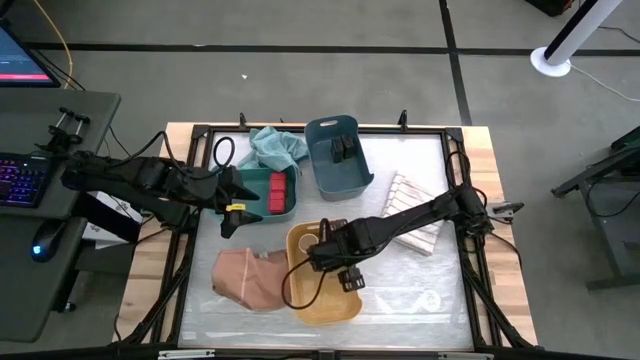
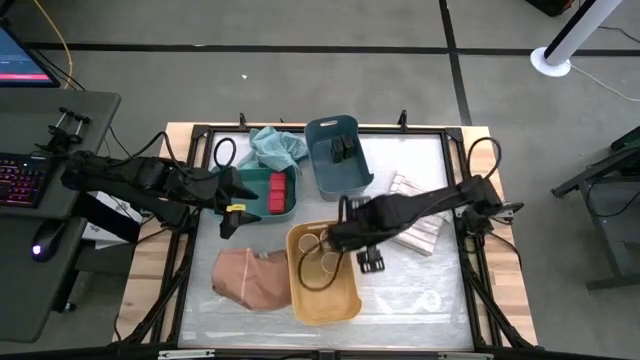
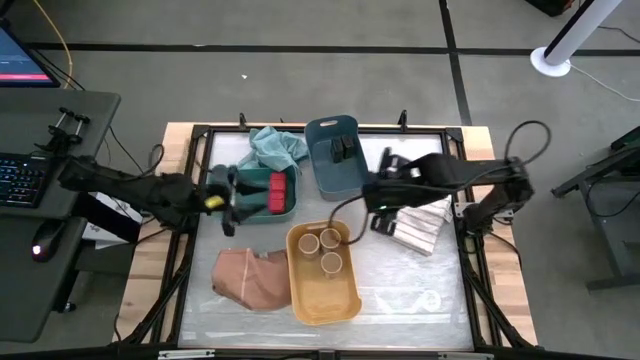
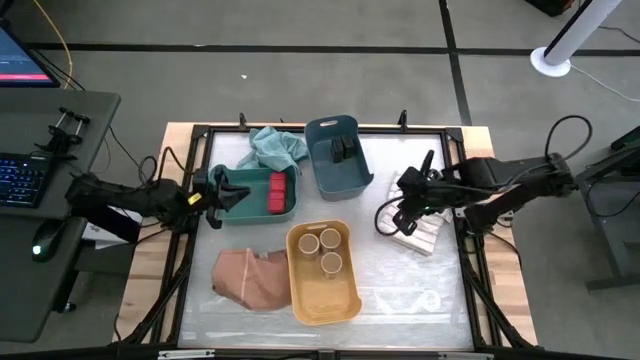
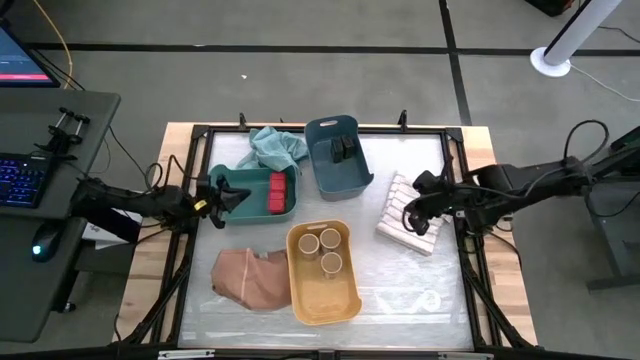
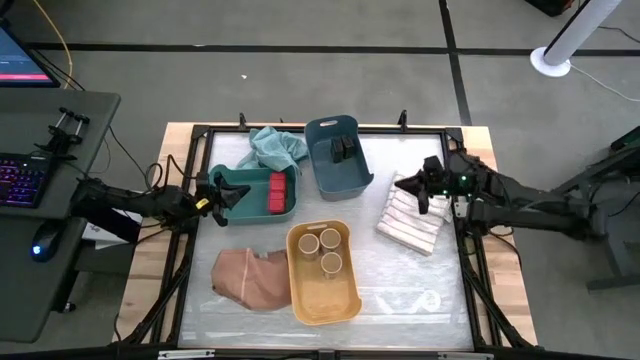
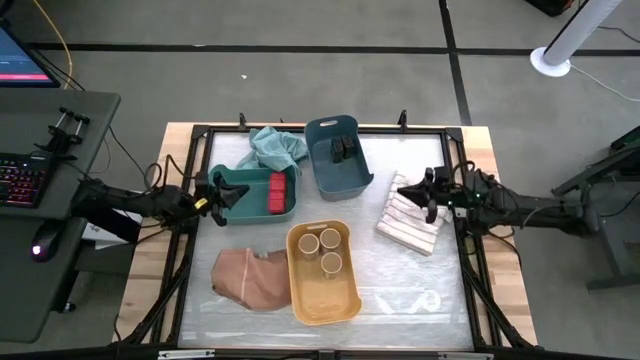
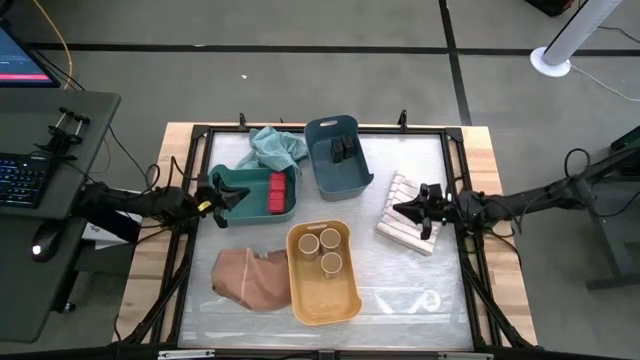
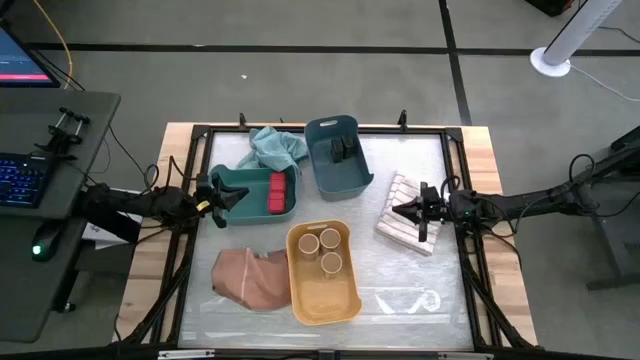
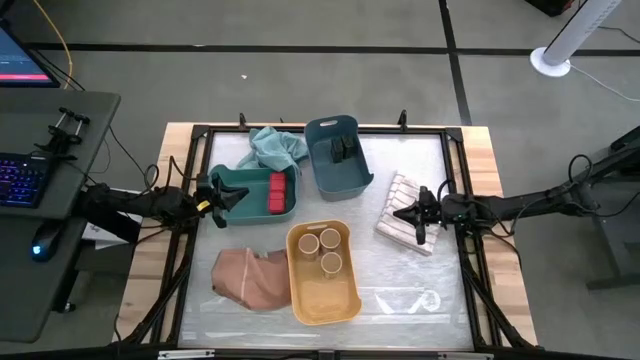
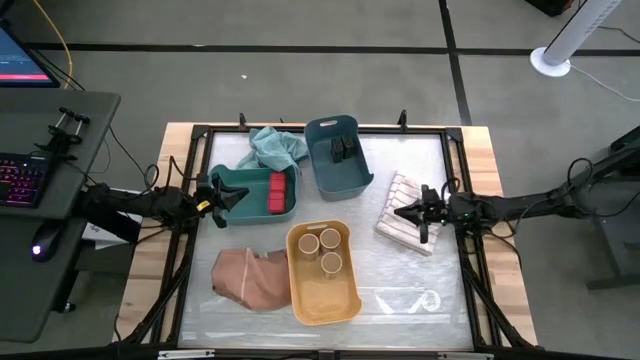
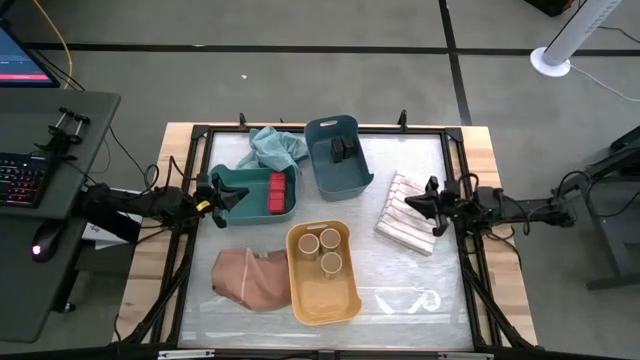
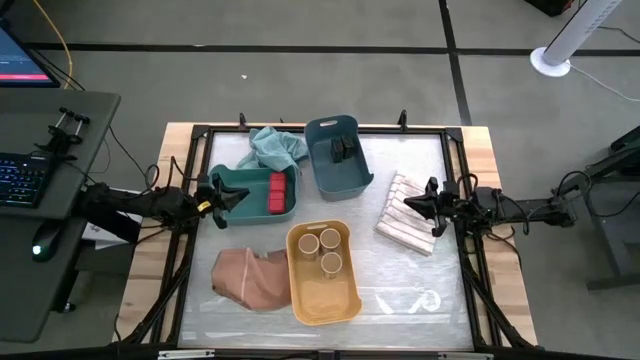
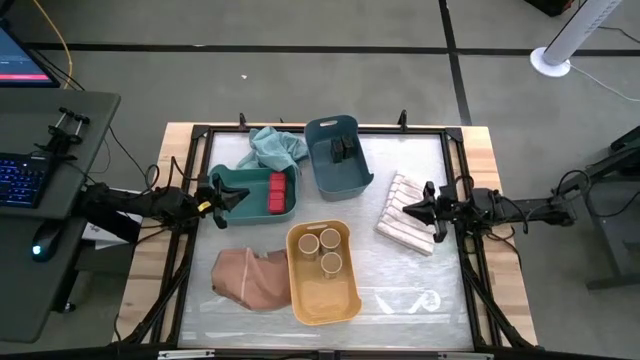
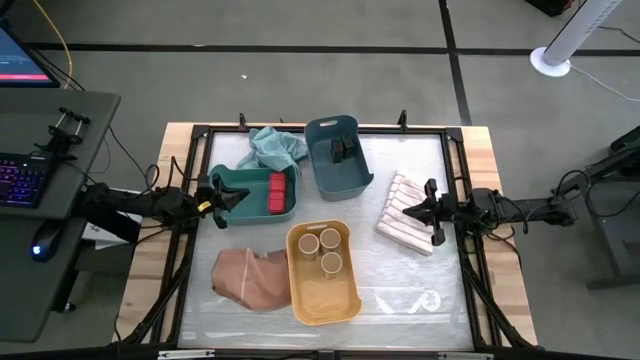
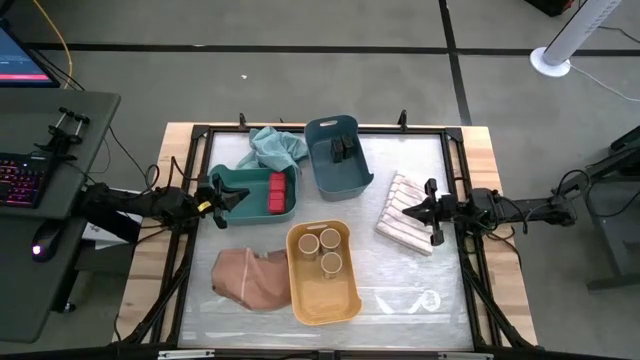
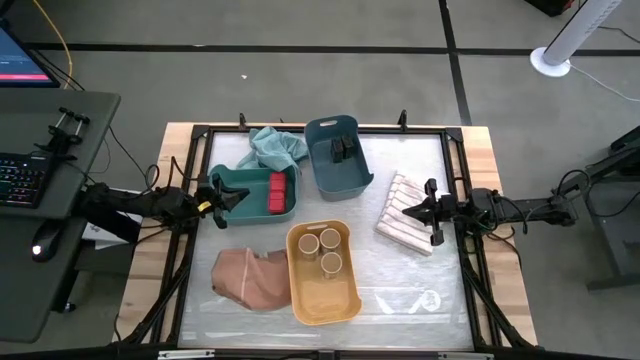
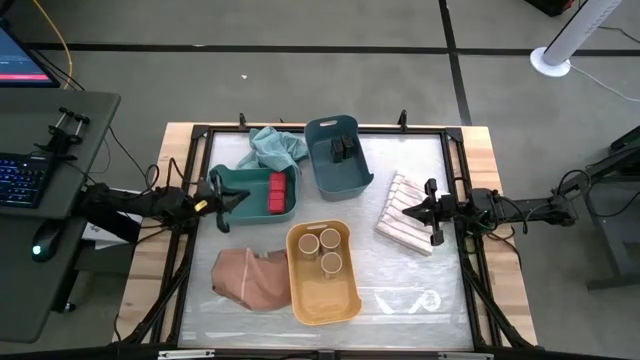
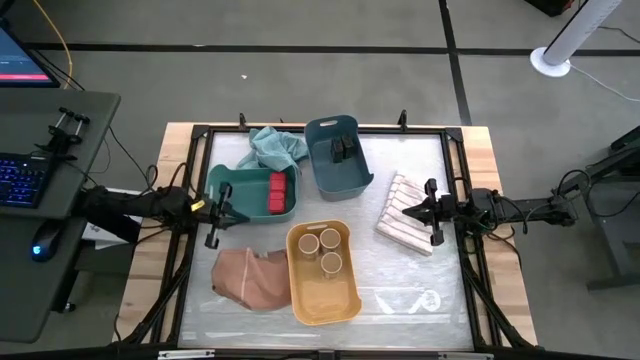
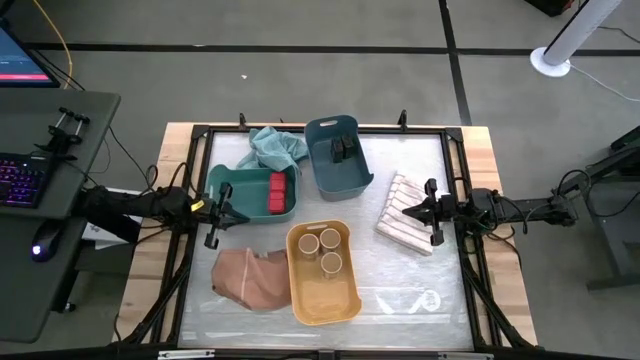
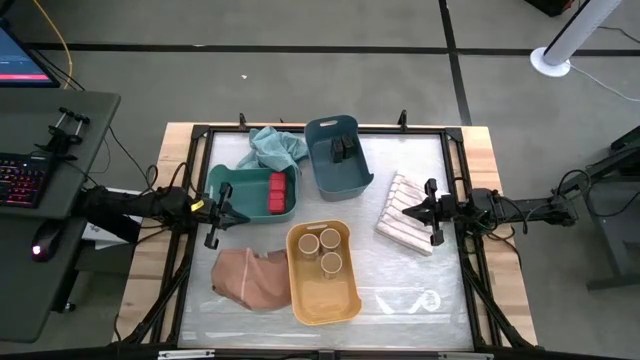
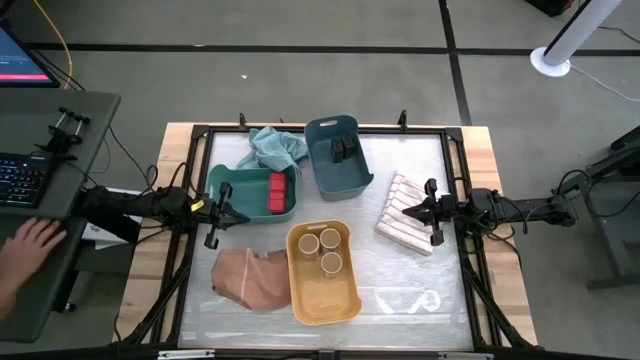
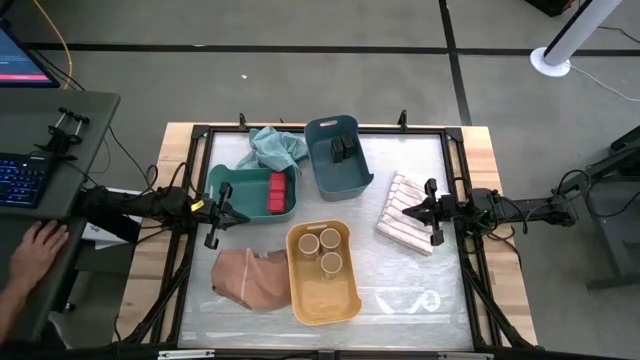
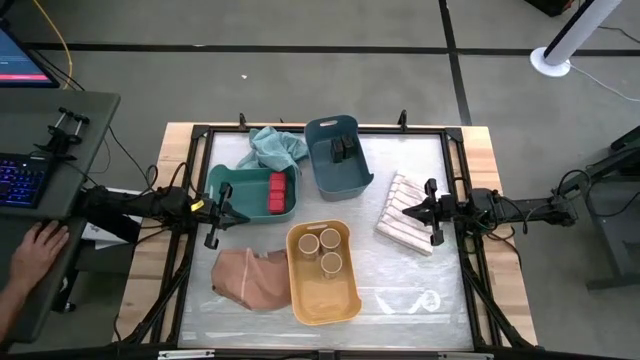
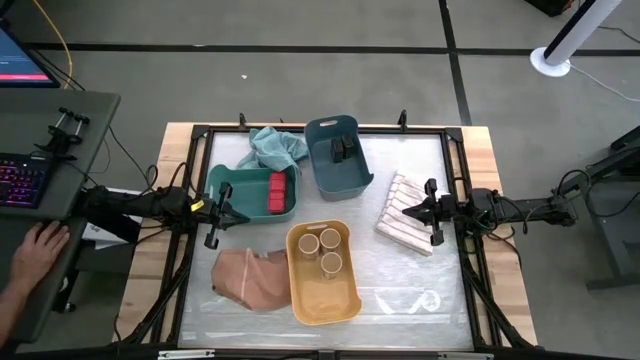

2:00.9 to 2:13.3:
Task: Sort spices by type
Return to Home Position

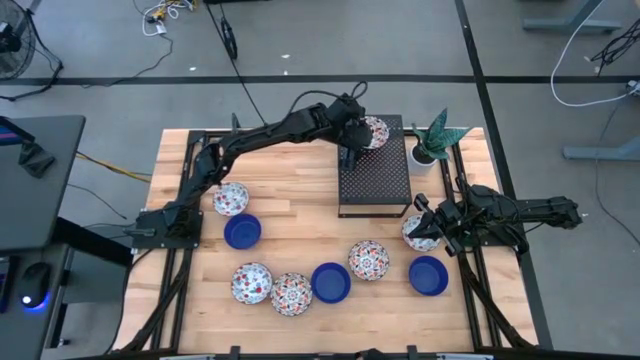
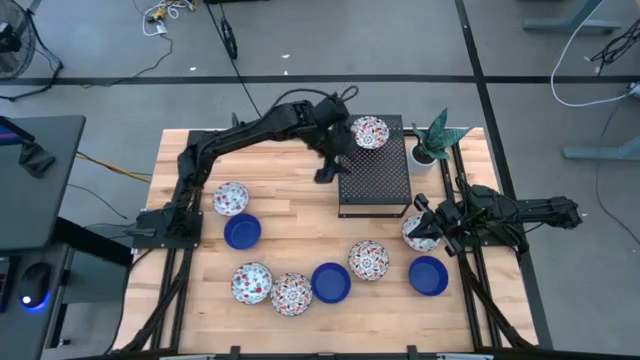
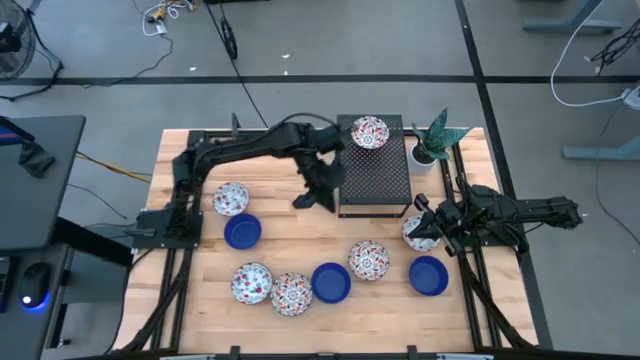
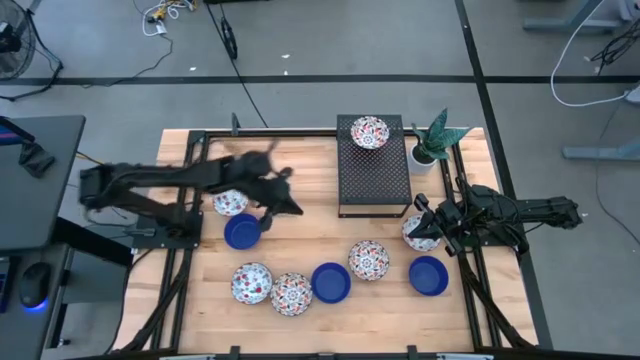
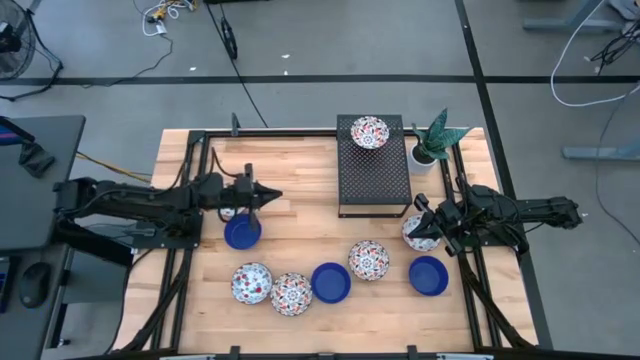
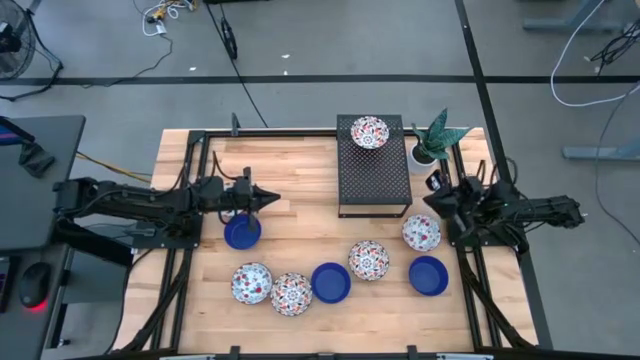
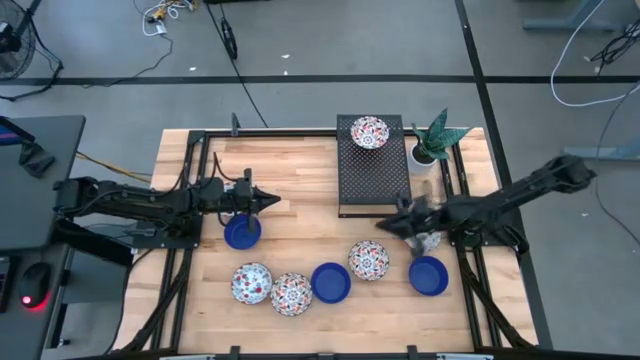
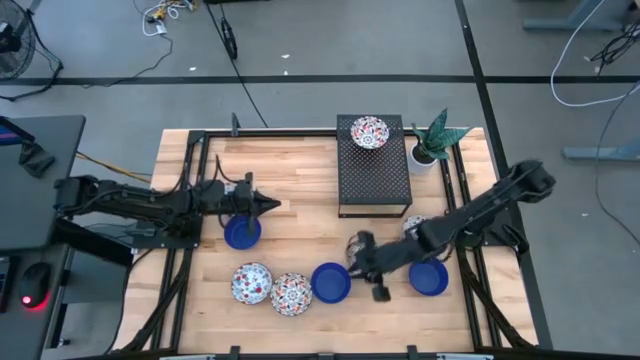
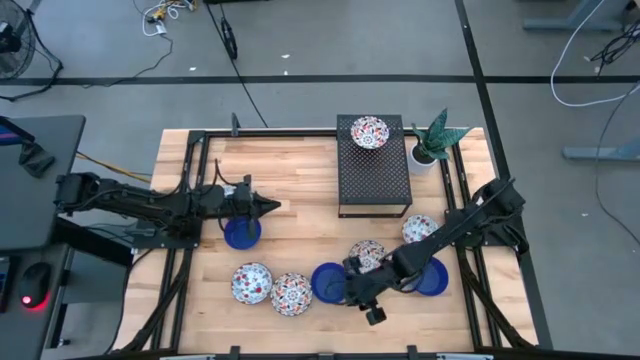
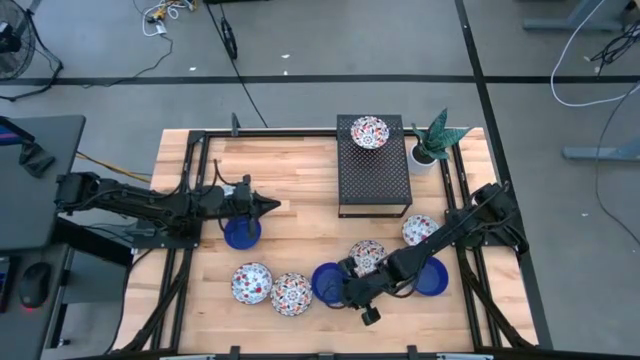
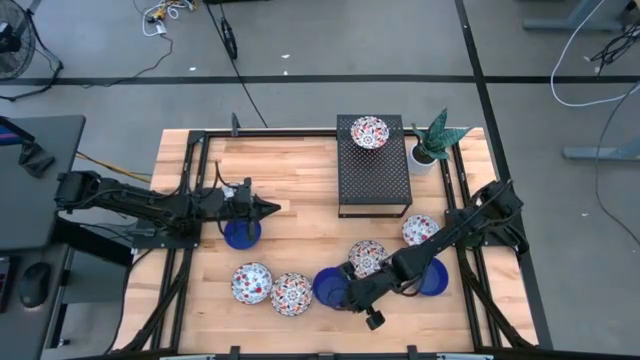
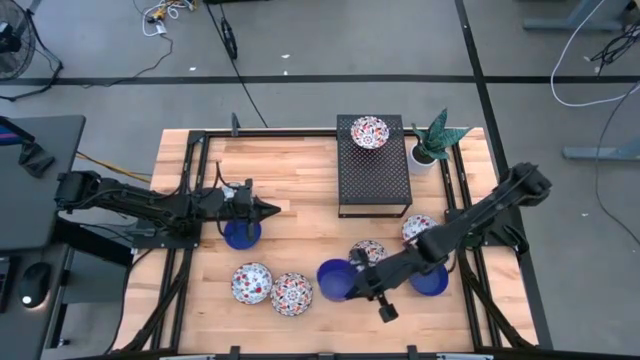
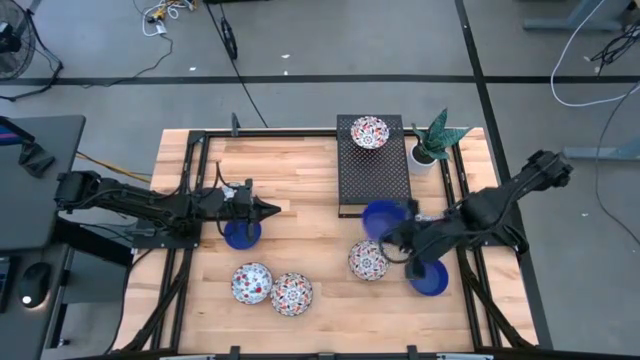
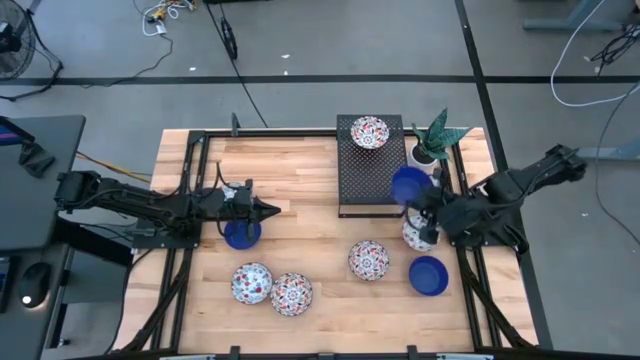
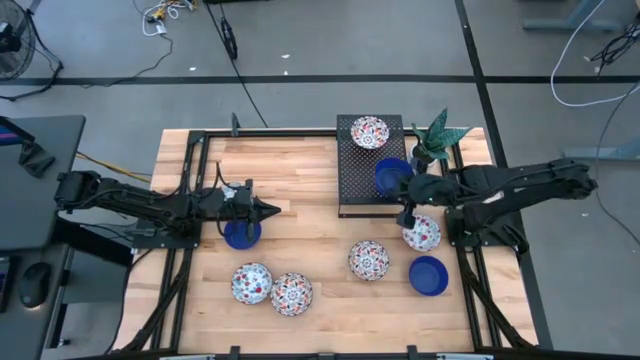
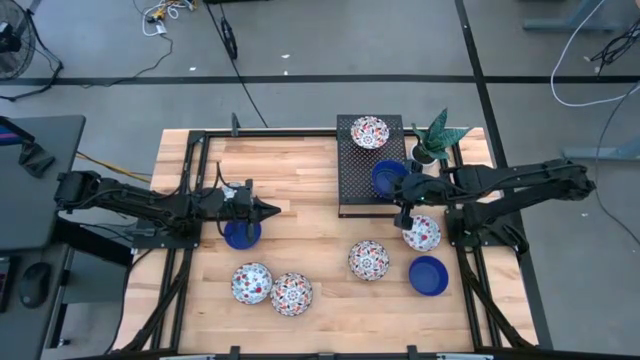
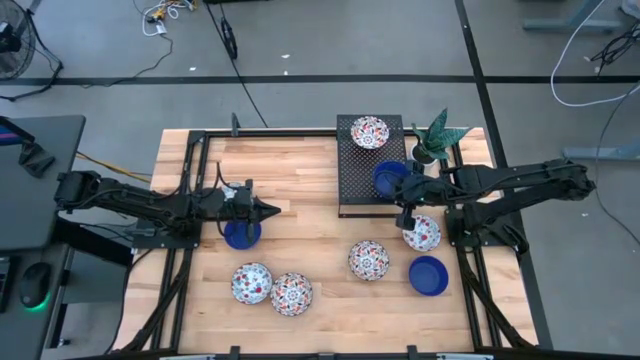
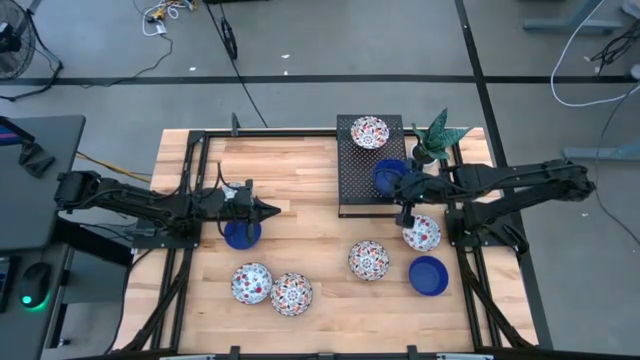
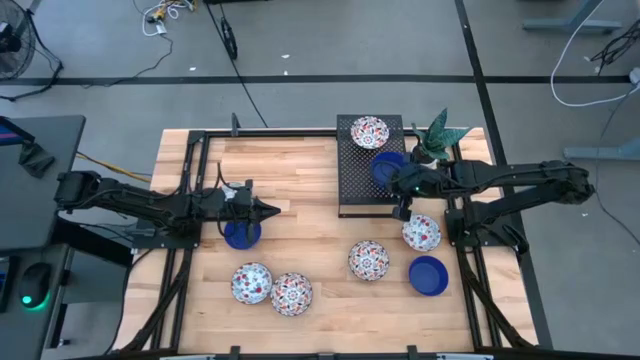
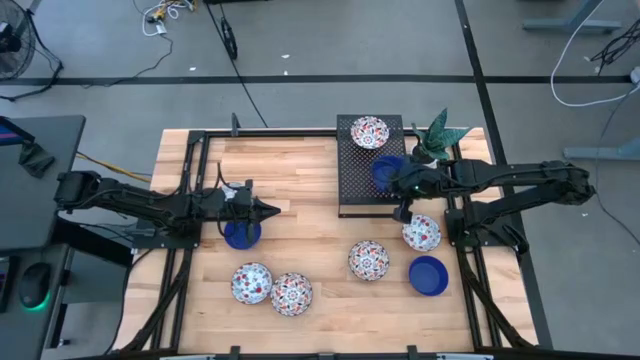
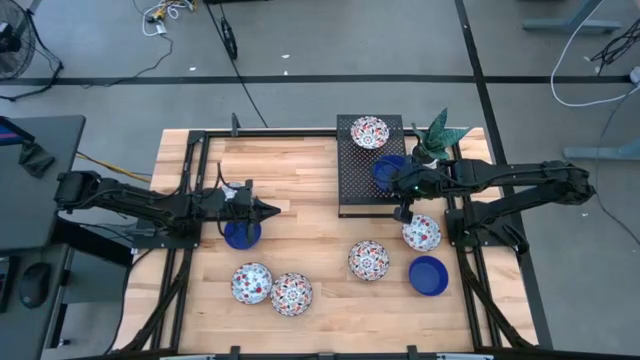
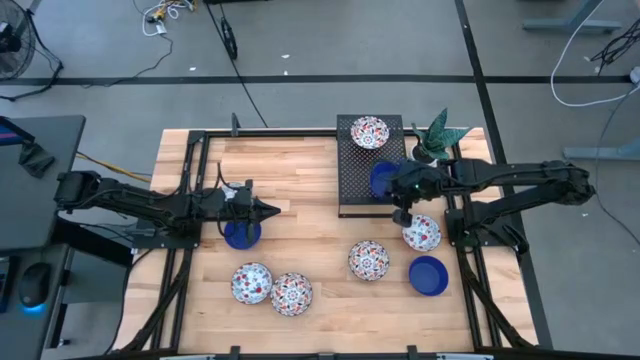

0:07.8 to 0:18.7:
Task: Pick & Place Mini bowls
Put the middle blue bowl on the shelf
